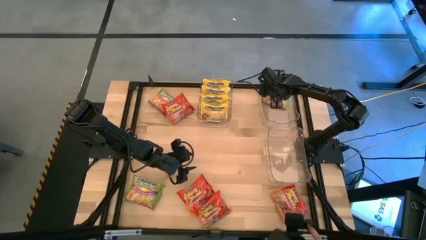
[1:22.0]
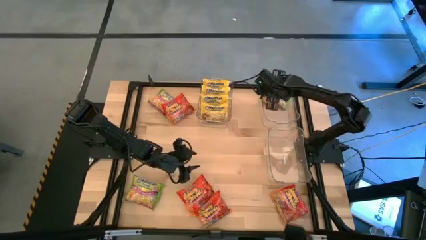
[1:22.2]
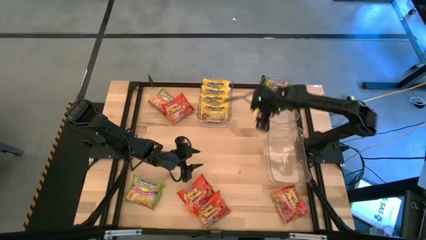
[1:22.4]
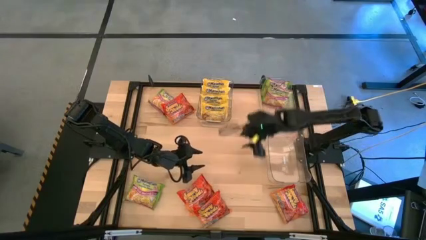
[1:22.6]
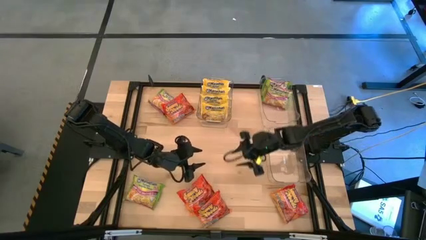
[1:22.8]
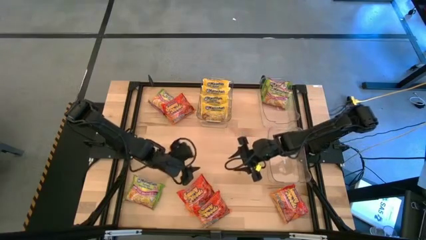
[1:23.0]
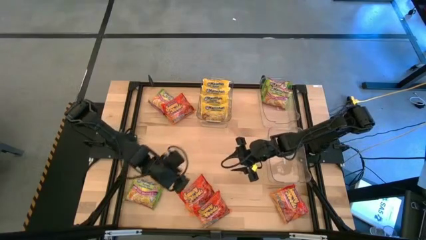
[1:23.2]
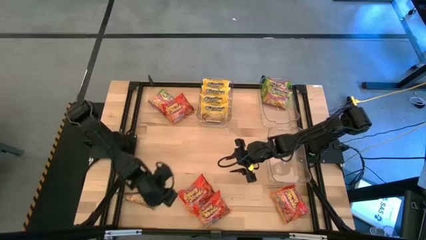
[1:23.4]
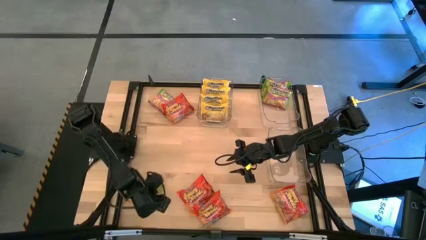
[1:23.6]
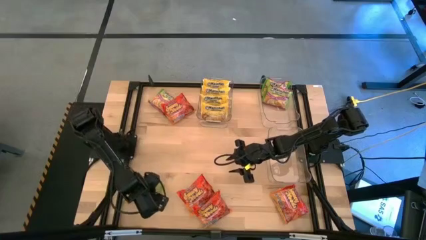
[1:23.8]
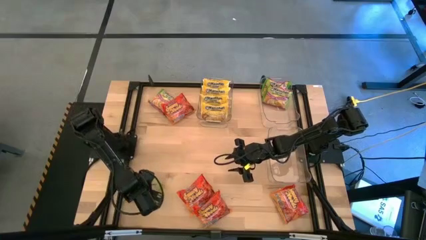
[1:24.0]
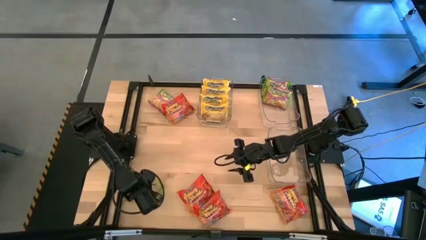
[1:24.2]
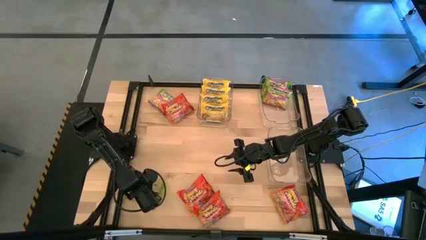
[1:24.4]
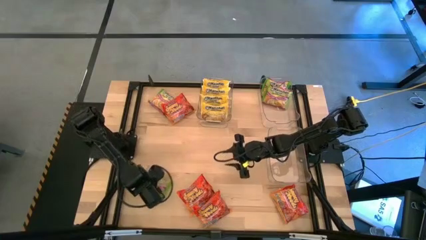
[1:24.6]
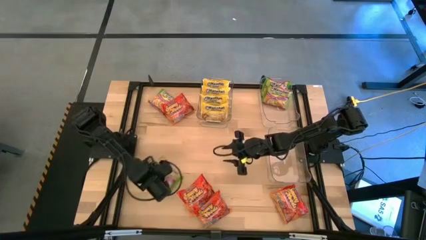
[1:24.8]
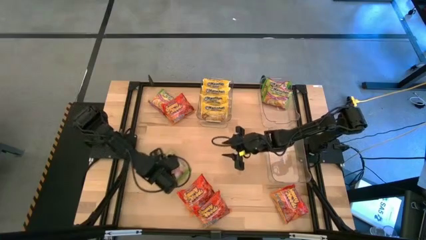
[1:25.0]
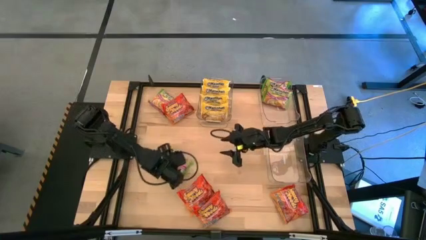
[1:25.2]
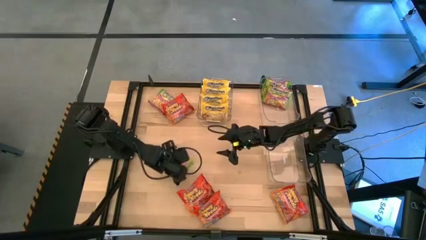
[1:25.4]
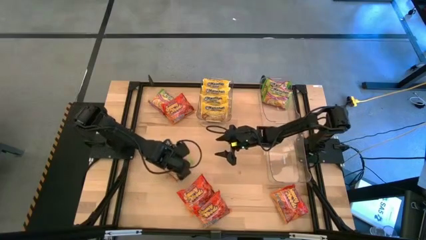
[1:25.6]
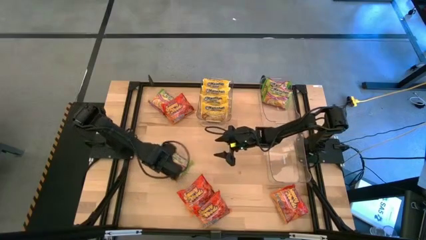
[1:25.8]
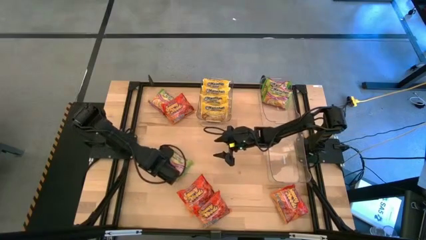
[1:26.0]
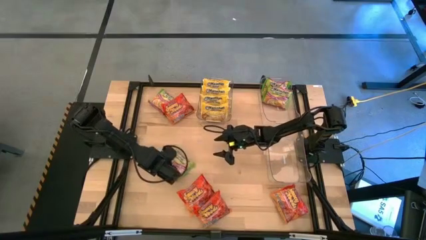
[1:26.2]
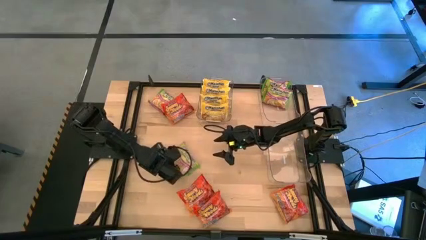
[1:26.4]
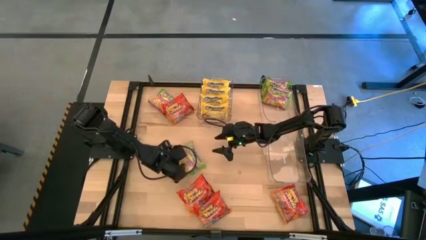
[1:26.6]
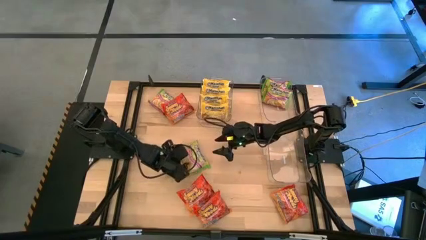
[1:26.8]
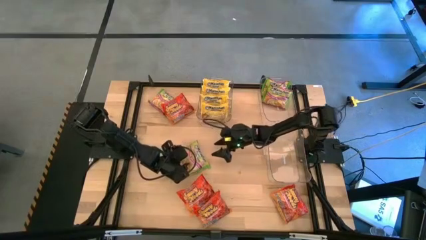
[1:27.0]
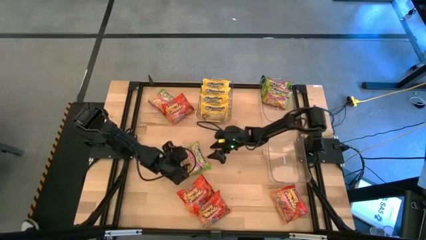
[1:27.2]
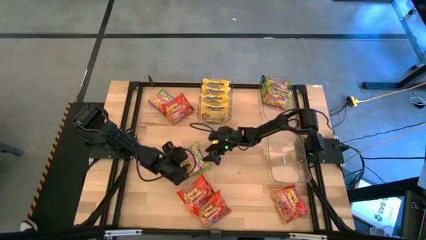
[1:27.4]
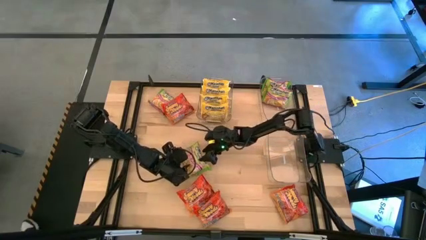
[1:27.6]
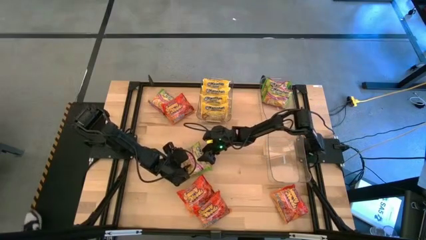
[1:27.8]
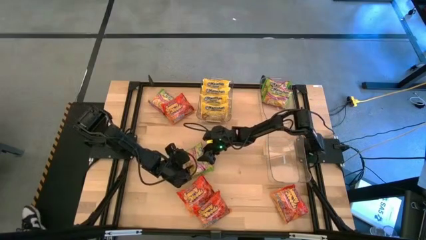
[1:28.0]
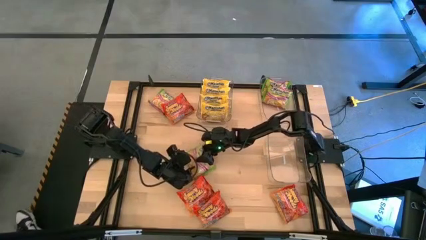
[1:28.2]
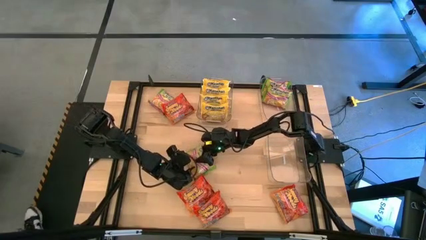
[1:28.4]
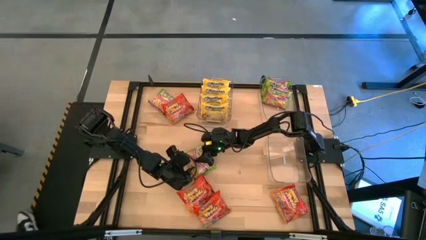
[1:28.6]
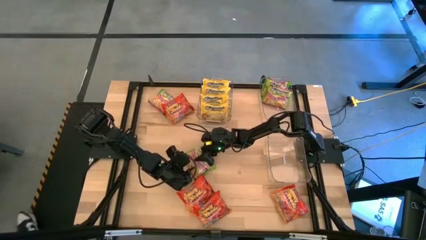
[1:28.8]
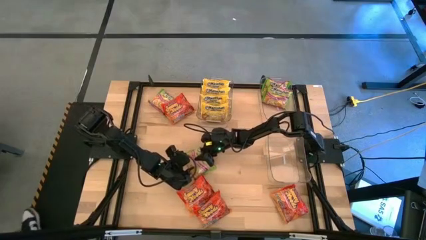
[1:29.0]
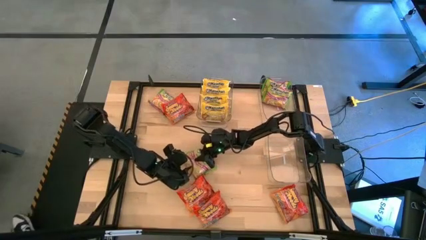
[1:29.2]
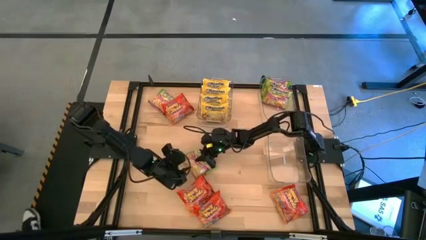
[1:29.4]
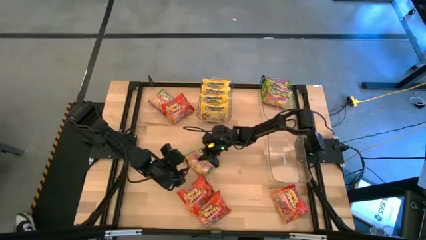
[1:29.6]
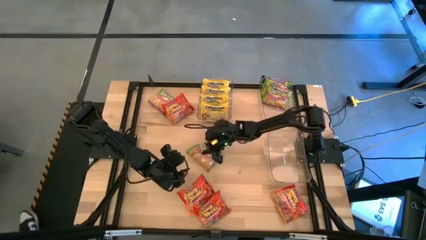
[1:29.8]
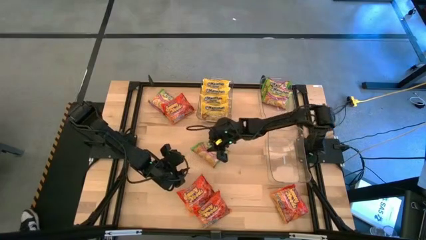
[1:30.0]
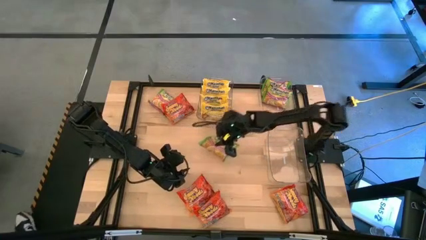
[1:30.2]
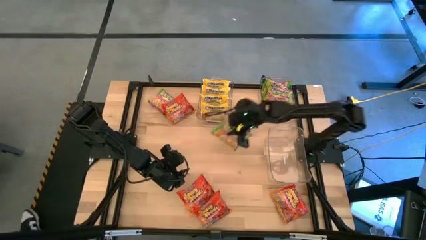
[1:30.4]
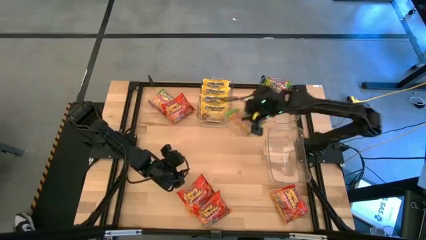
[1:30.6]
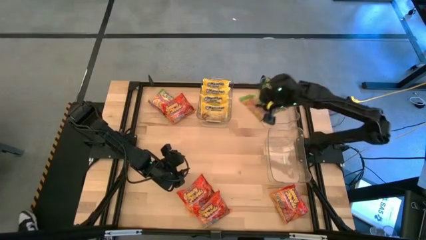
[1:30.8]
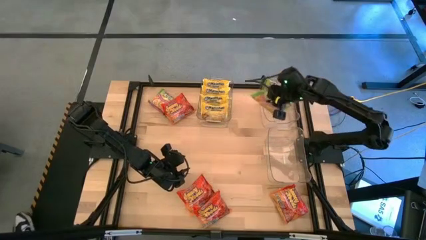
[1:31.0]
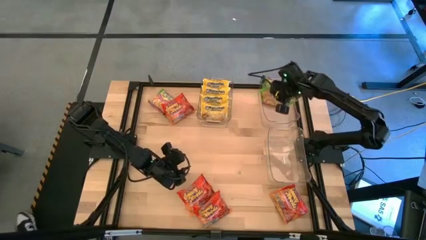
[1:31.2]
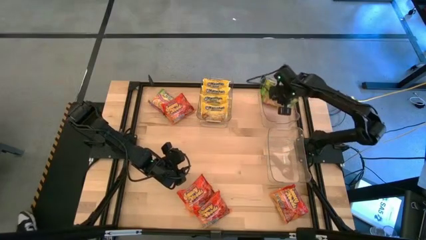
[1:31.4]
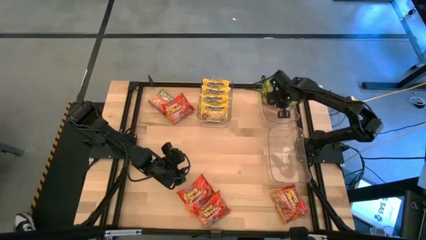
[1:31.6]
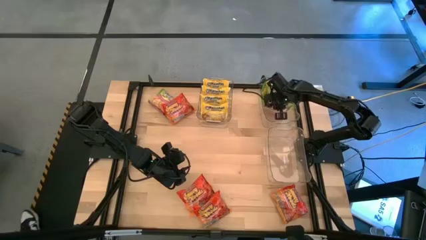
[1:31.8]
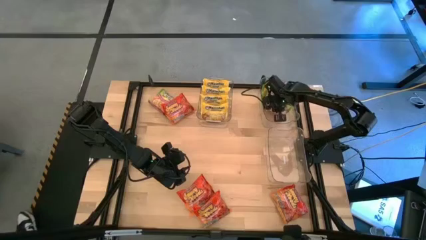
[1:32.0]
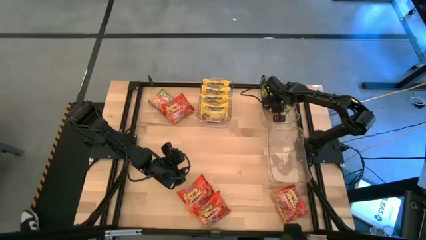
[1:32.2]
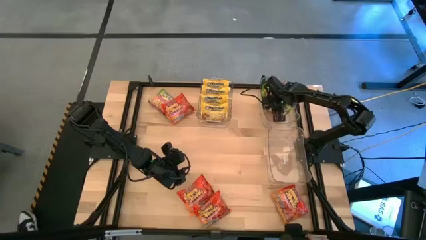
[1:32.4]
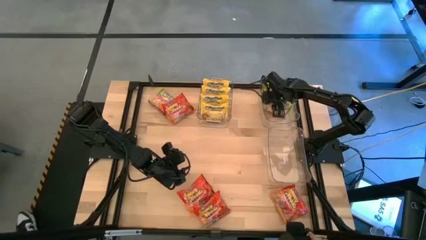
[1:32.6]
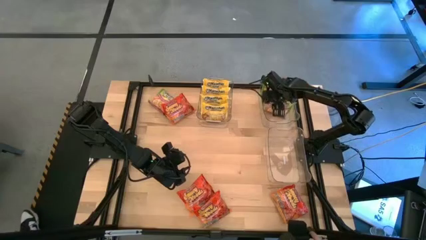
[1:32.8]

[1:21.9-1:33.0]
Task: Sort Maruchan noodles
Put the green noodle pack into the top right transparent bin

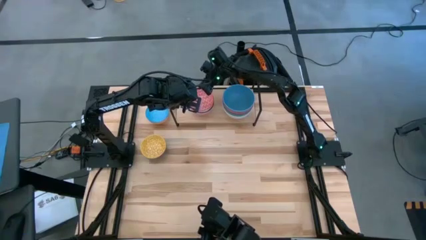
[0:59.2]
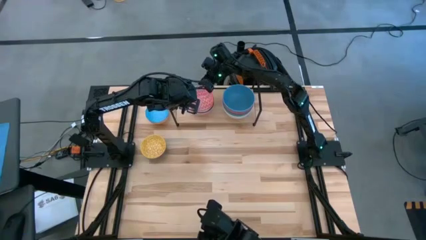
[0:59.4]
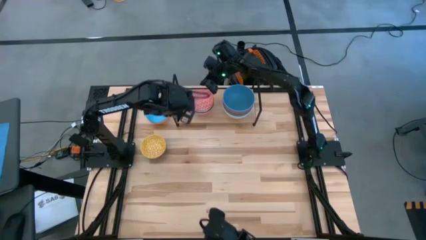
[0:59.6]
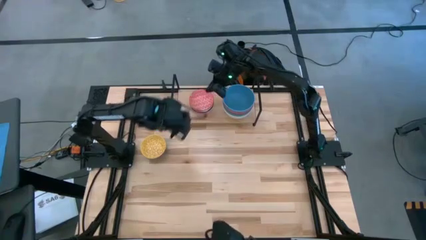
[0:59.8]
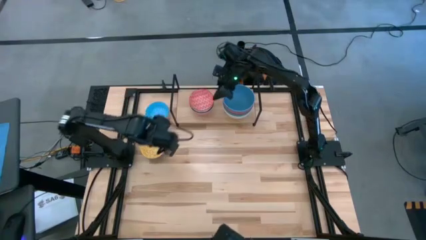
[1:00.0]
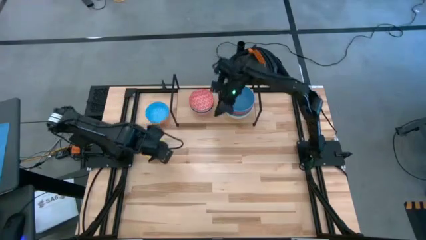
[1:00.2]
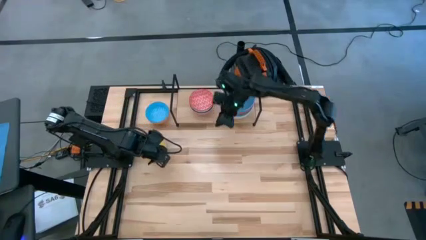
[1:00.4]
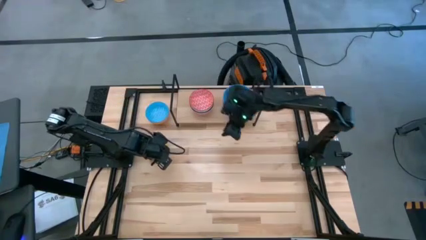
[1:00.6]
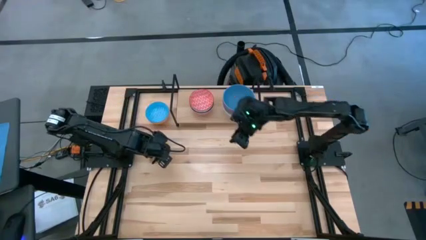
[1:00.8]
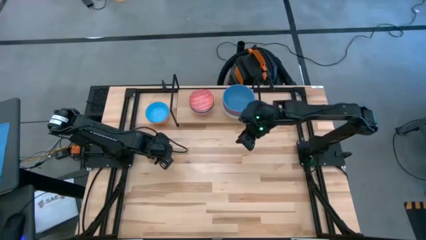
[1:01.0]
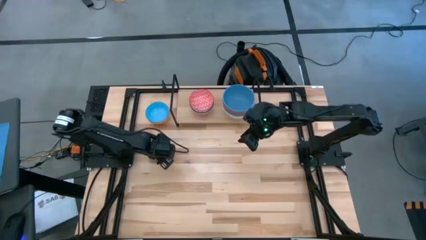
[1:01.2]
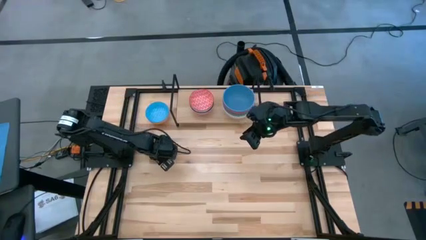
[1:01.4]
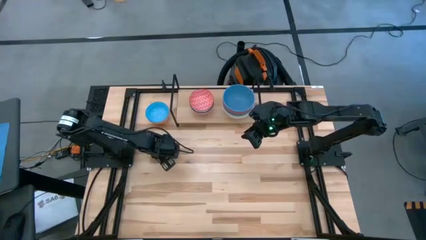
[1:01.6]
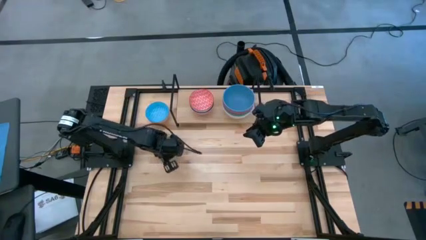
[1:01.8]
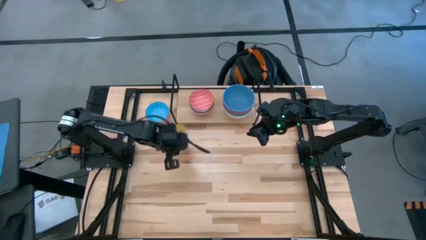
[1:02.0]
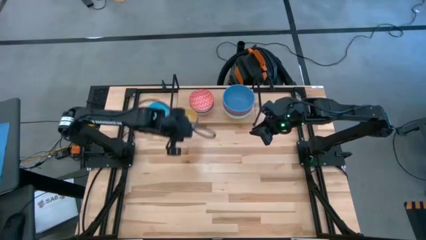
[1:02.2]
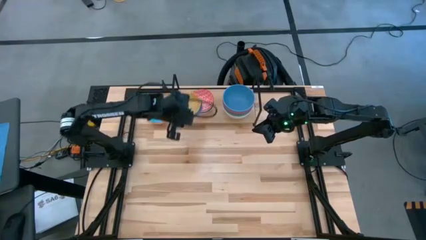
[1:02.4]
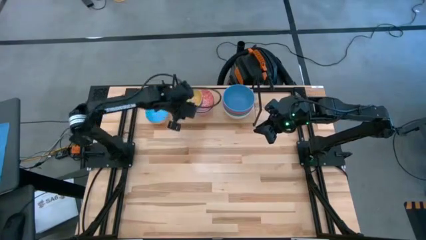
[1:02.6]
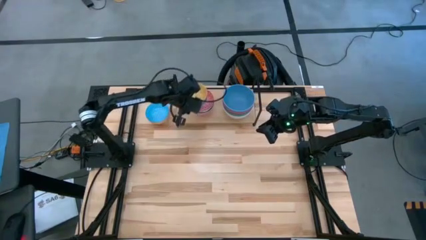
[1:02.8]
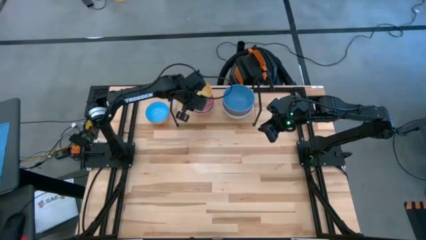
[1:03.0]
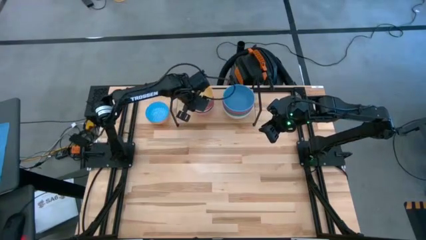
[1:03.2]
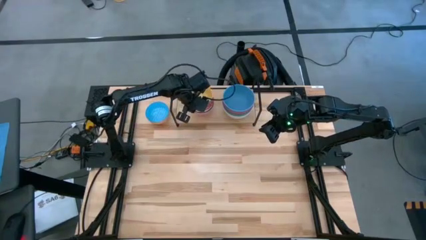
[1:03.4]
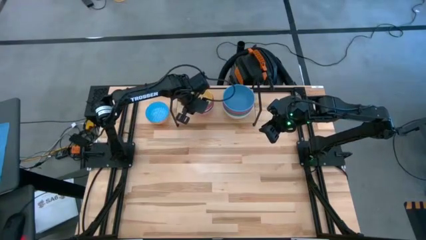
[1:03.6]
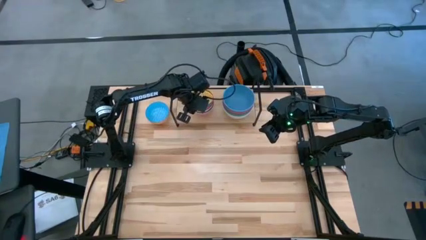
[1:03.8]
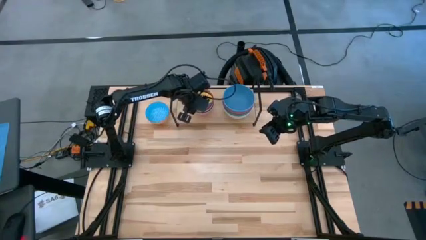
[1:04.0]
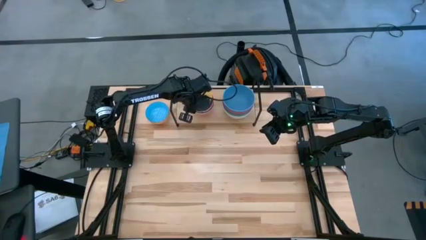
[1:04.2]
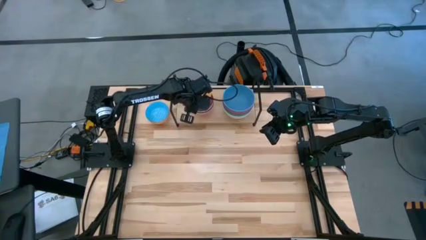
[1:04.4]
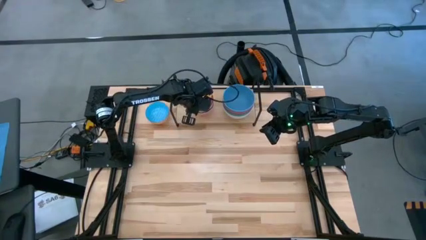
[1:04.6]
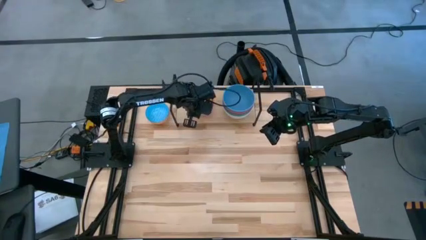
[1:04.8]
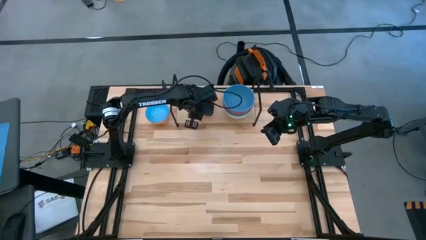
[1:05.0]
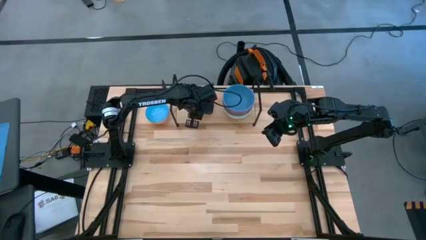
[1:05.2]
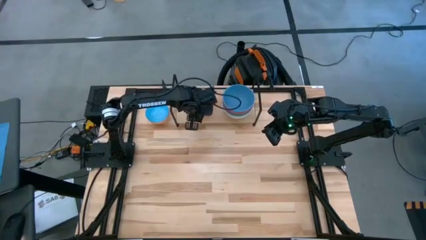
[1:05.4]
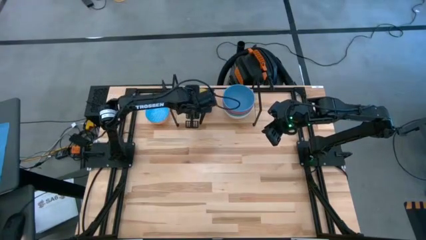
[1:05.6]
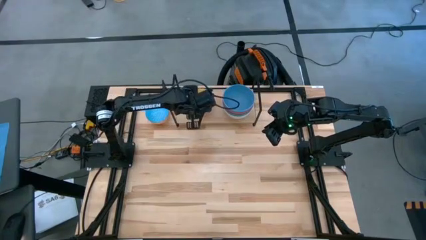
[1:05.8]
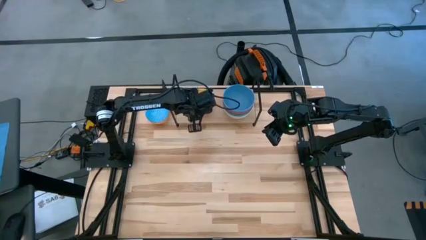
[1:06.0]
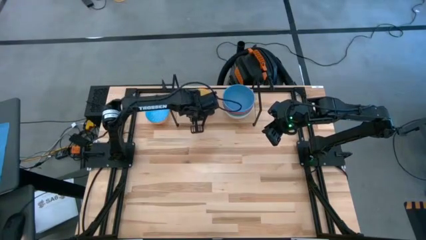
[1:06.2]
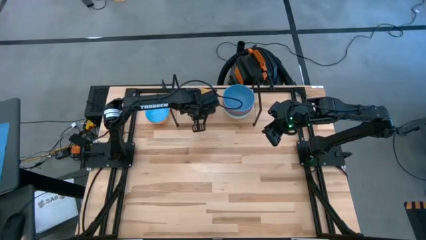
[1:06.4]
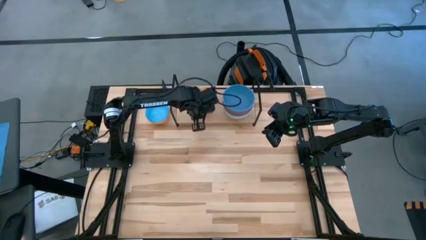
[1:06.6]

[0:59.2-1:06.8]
Task: Place and stack bowls onto a shelf
Stack the small yellow bowl on the small red bowl on the shelf
